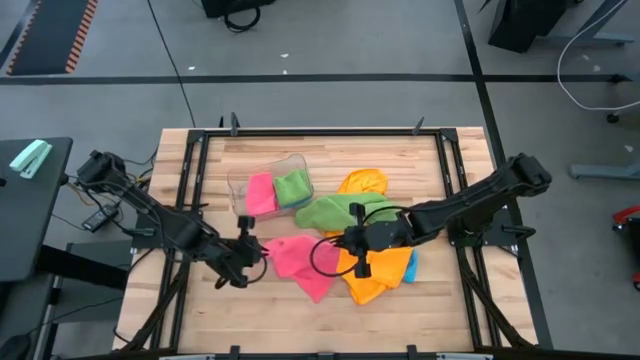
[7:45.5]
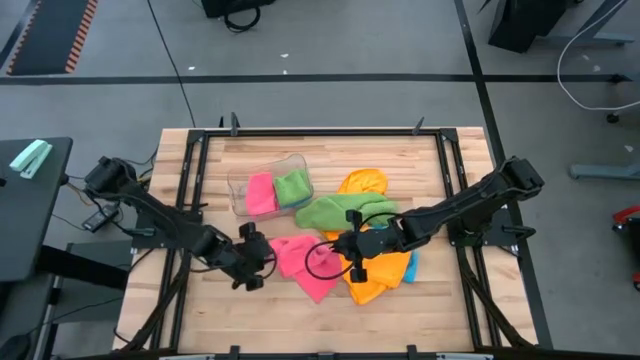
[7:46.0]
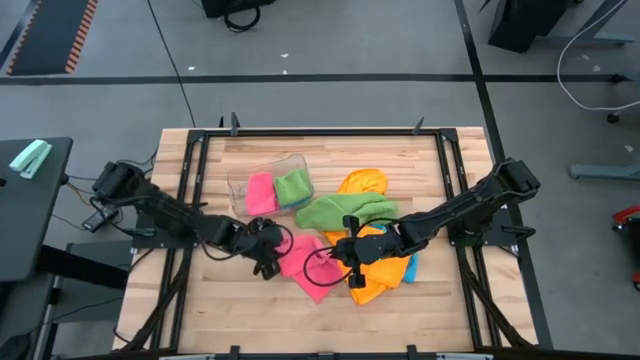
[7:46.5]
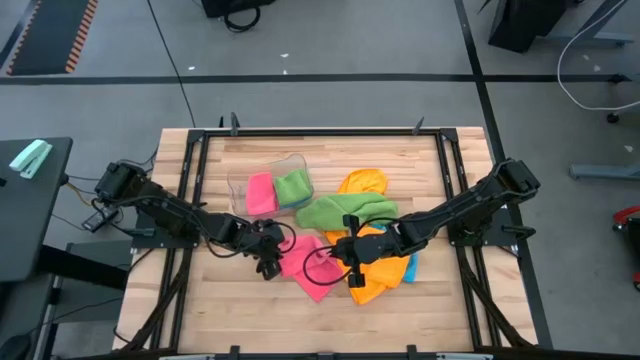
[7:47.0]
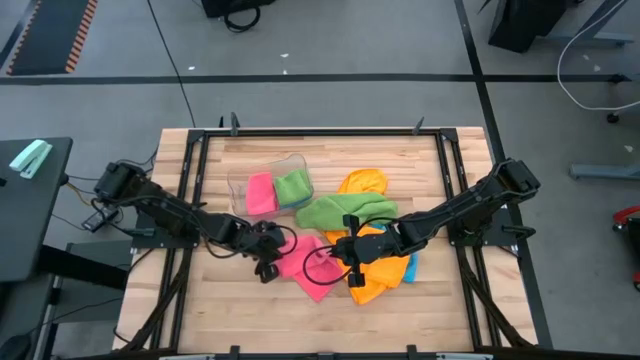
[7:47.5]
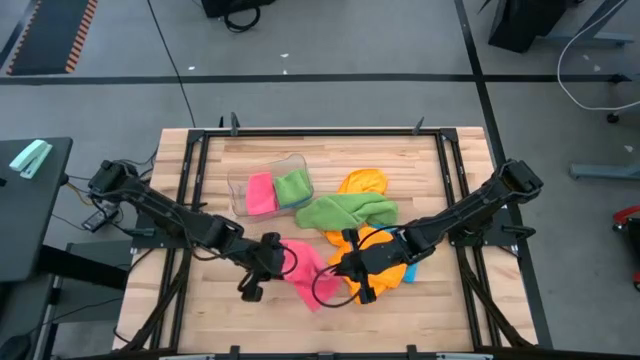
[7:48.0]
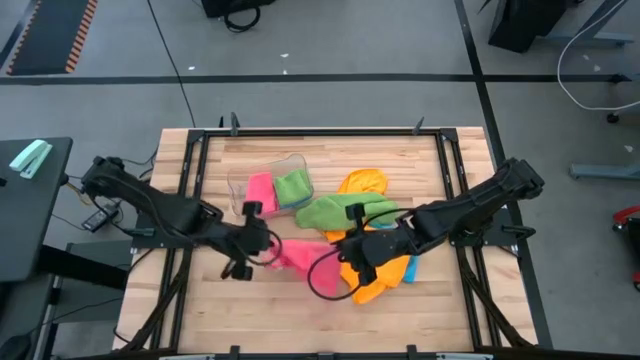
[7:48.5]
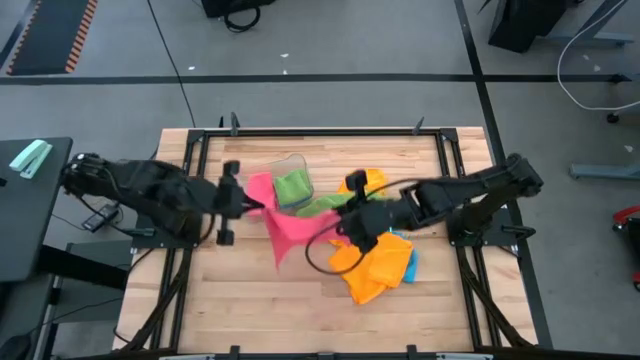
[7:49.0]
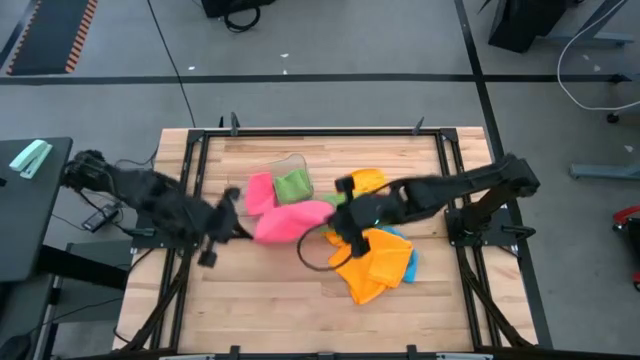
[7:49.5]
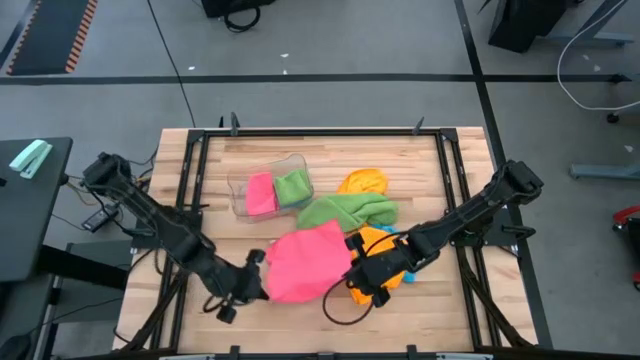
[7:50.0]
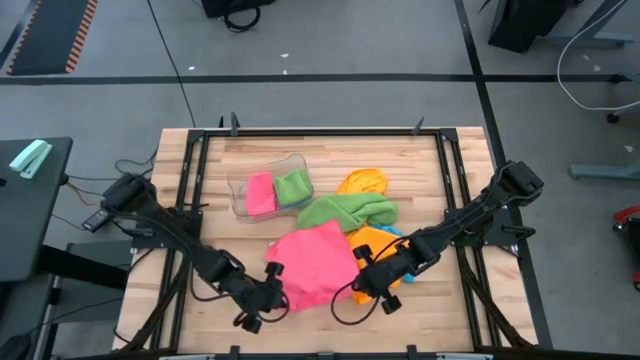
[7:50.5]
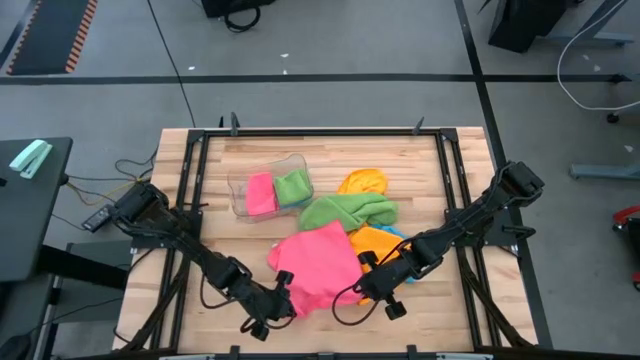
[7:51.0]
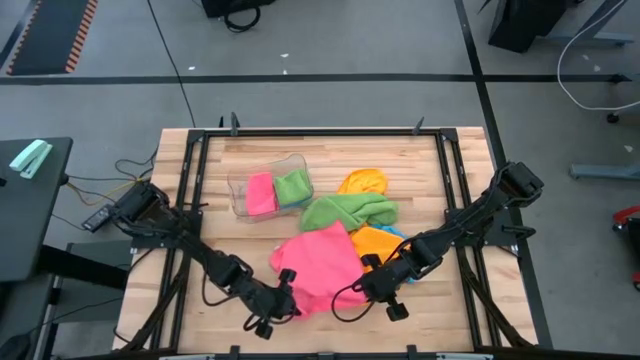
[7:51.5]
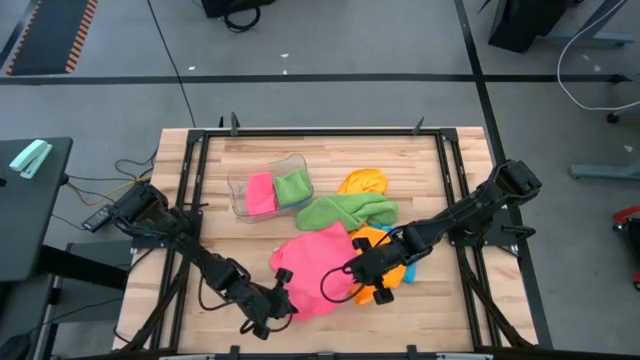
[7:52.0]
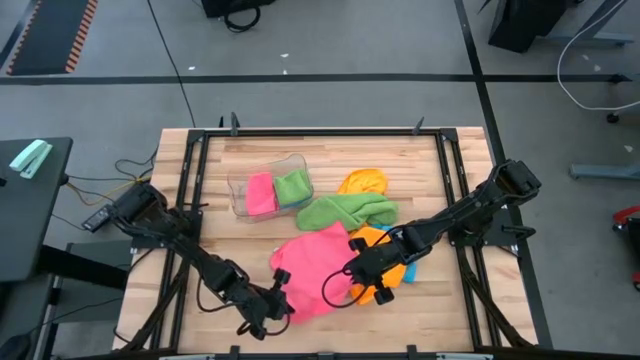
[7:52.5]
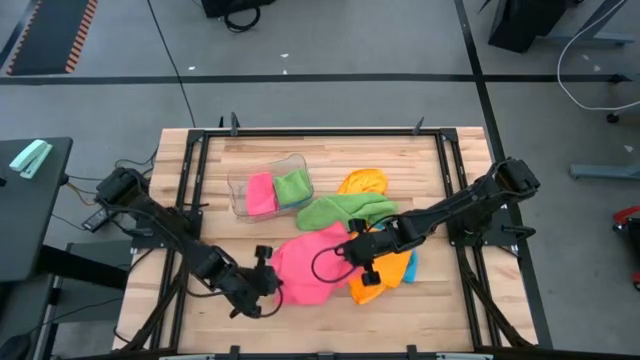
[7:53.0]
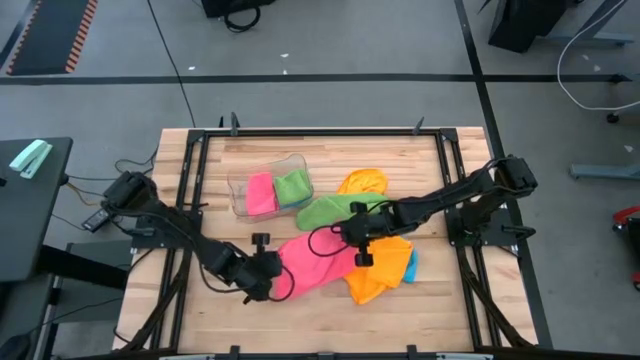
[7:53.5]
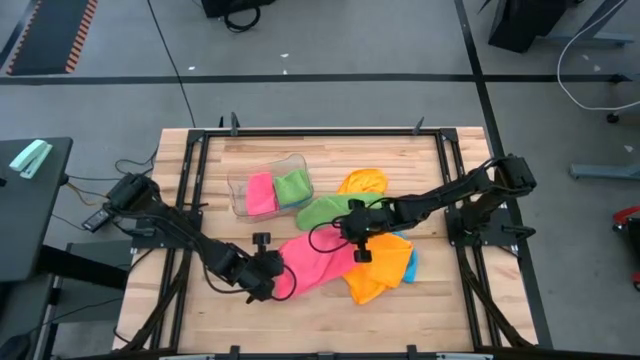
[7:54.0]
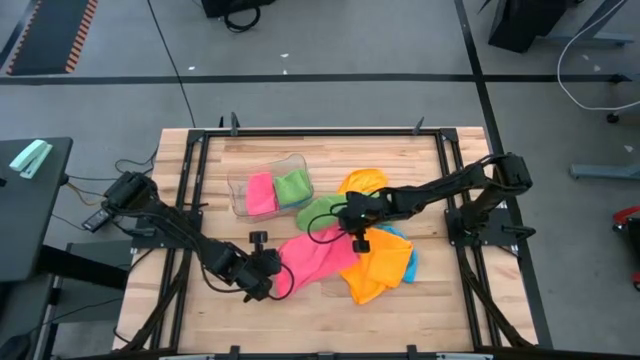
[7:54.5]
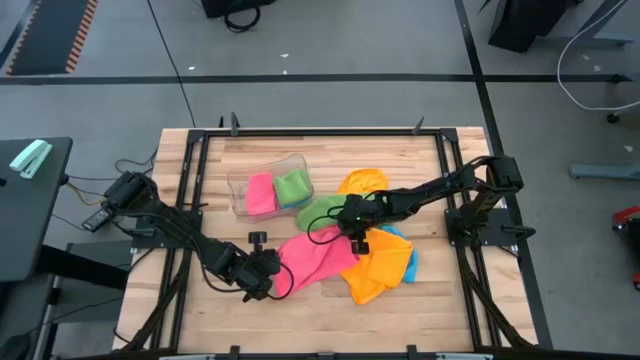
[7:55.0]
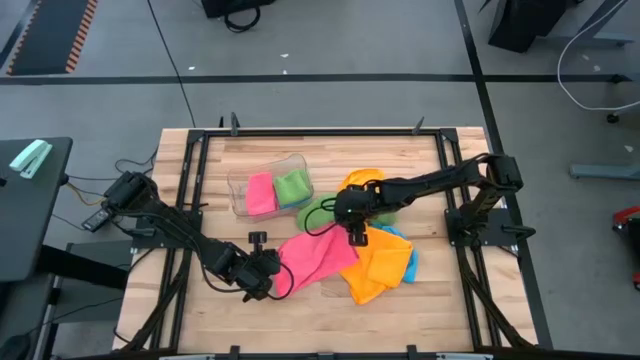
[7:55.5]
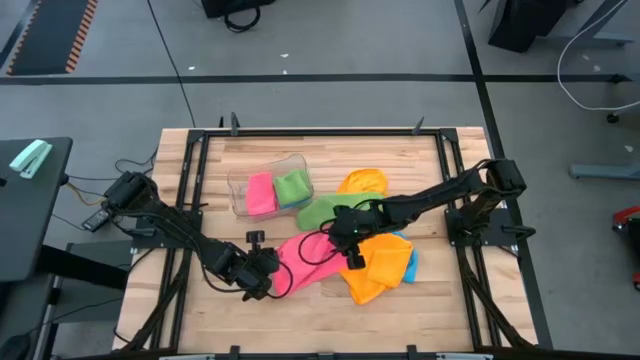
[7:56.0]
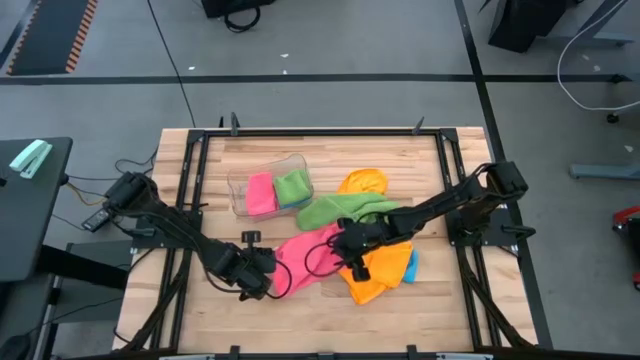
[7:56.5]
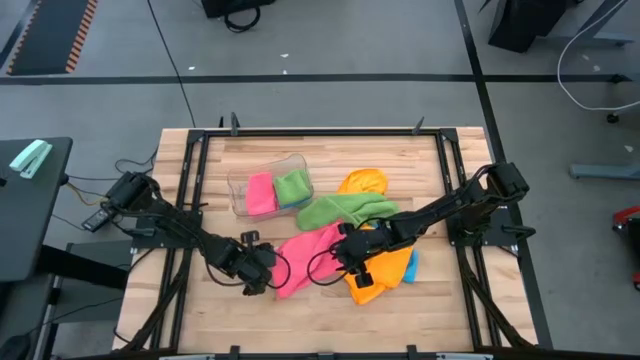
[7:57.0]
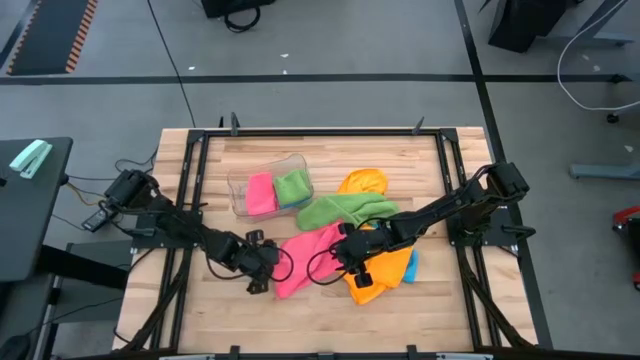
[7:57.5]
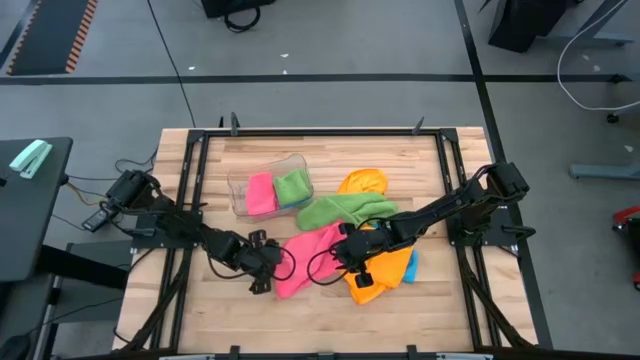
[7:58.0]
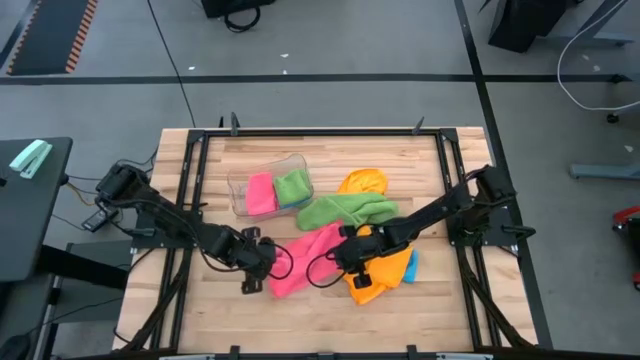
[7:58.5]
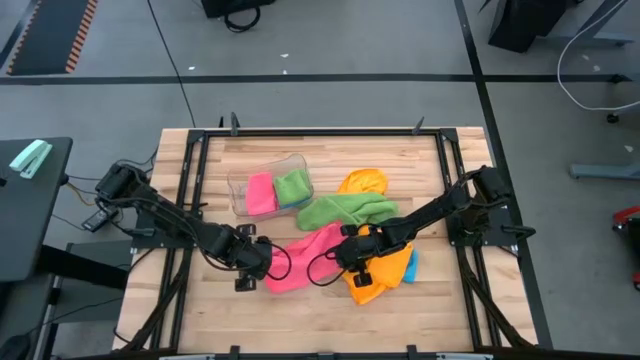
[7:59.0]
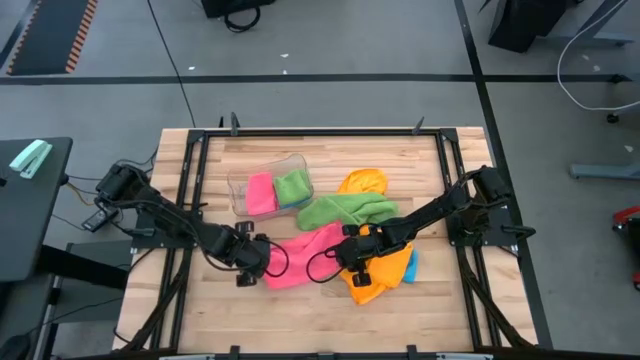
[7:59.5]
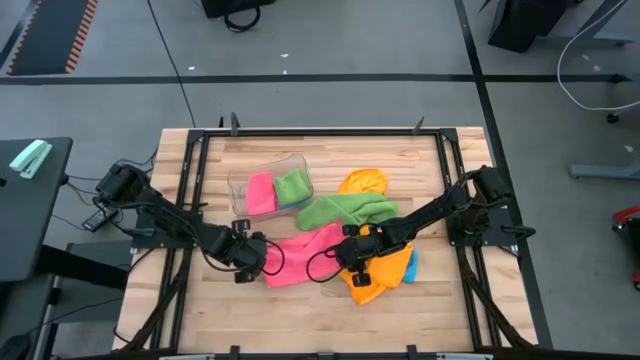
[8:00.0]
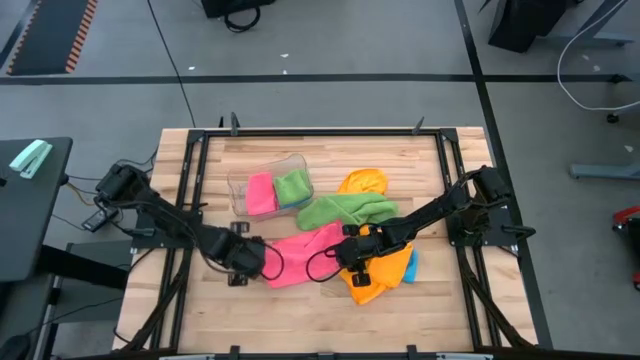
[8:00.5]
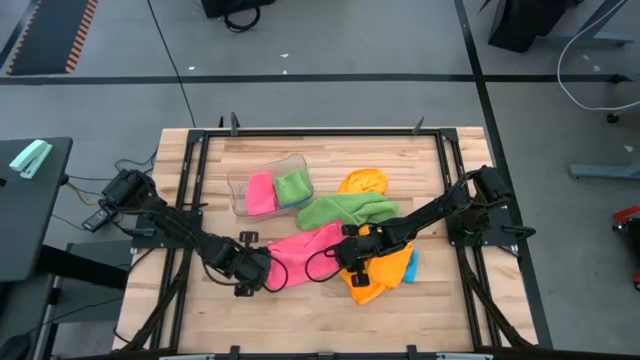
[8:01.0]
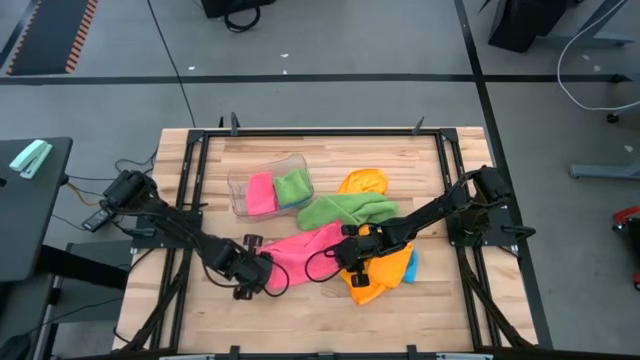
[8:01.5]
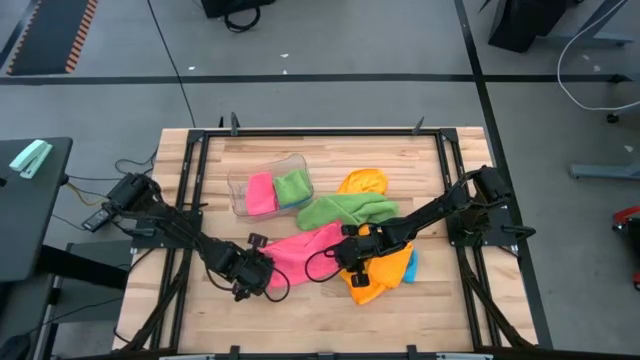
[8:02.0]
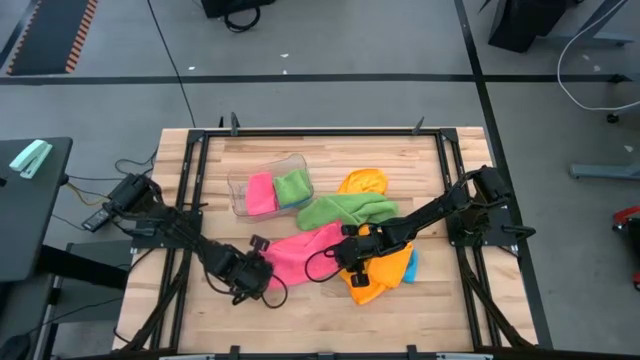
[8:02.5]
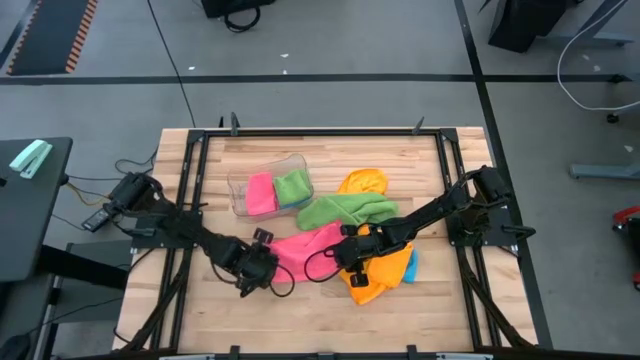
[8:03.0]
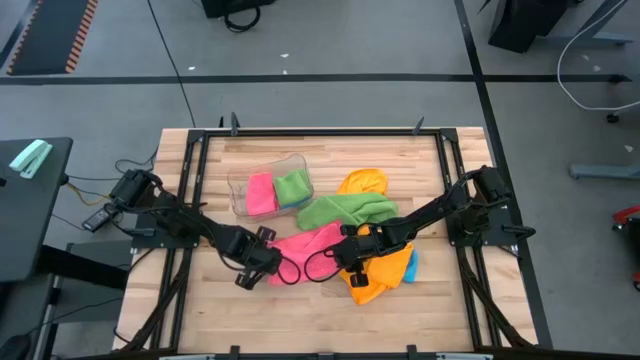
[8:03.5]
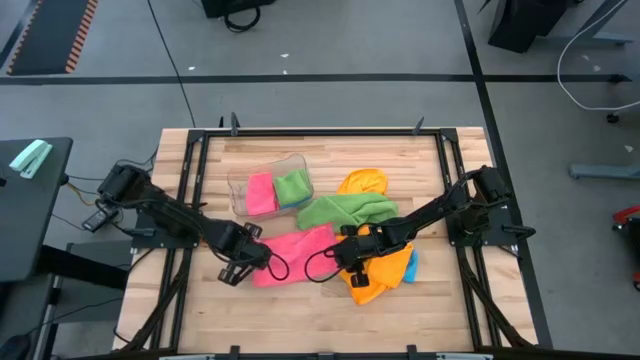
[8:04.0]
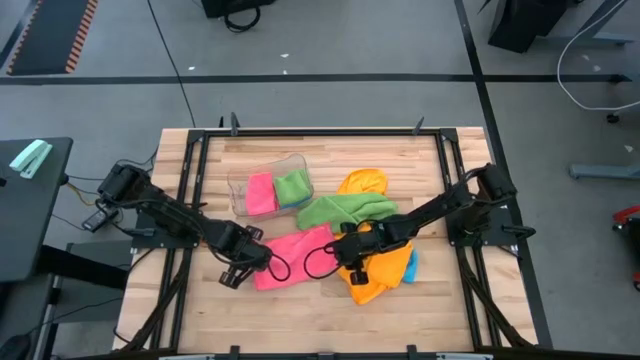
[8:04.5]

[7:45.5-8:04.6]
Task: Fold microfiber towels
Fold the pink microfiber towel

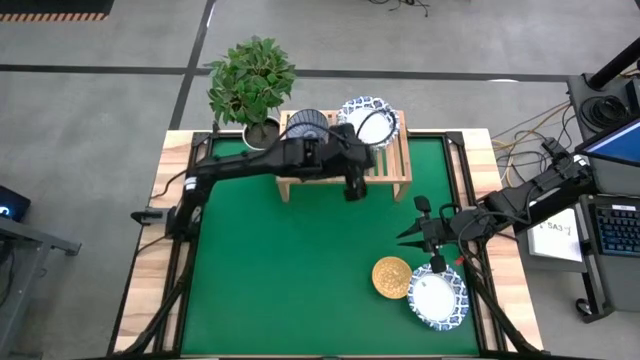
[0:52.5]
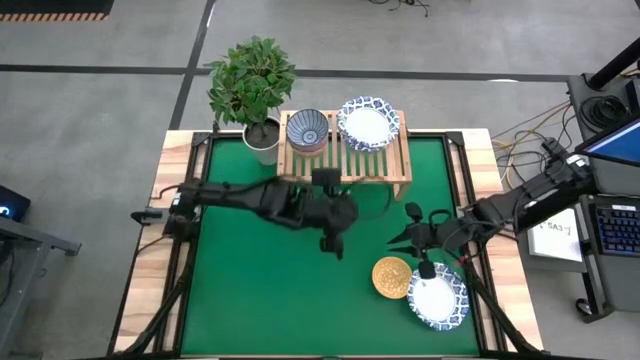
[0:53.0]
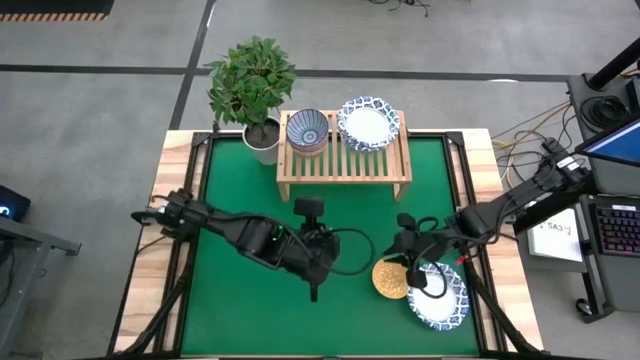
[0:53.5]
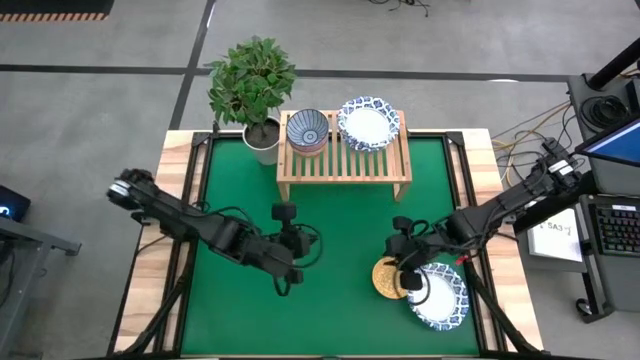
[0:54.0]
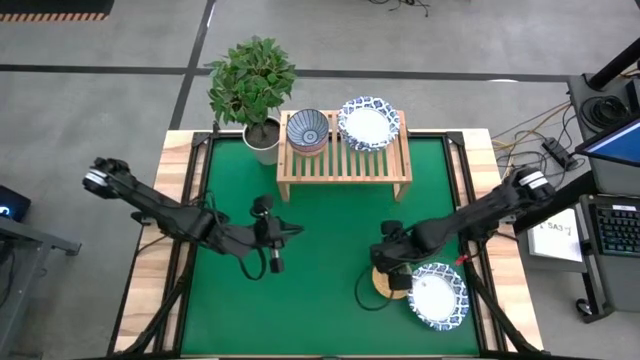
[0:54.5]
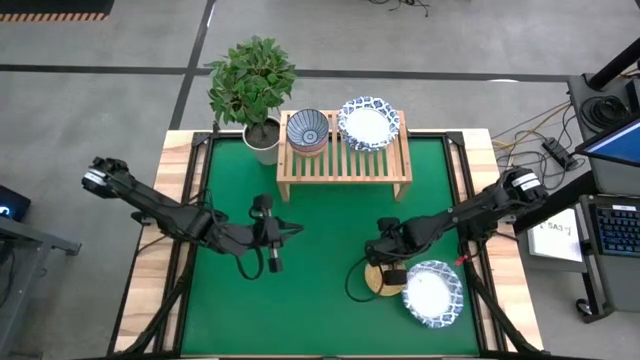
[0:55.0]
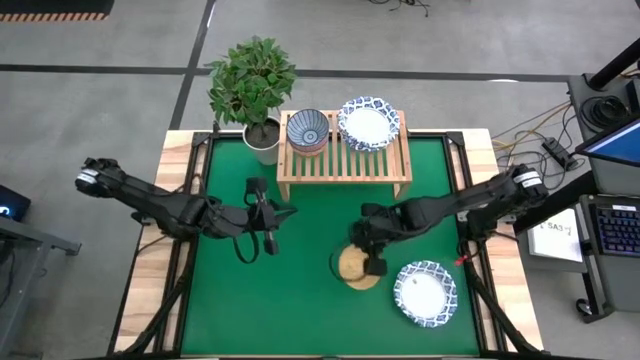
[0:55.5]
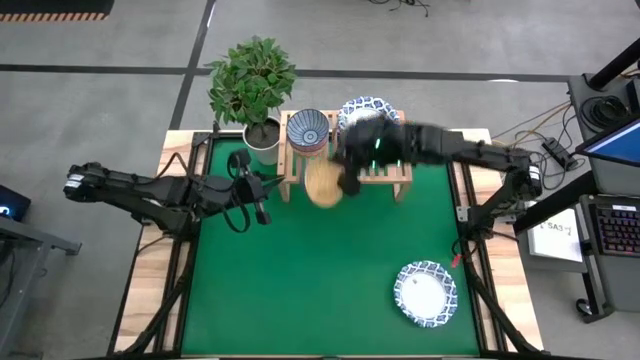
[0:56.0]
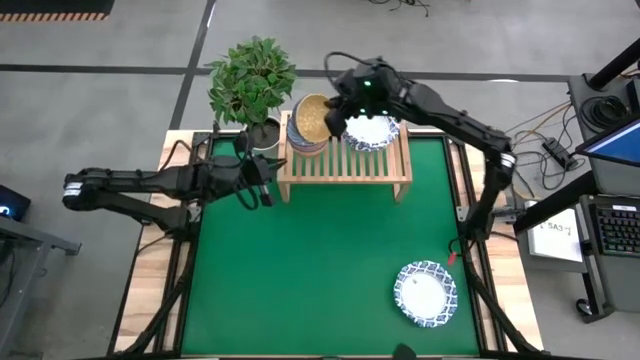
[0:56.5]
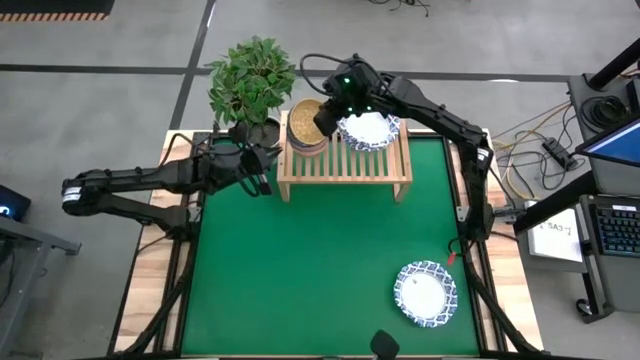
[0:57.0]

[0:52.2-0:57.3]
Task: Place and stack bowls onto a shelf
Stack the yellow patterned bowl on top the dark blue patterned bowl on the shelf
